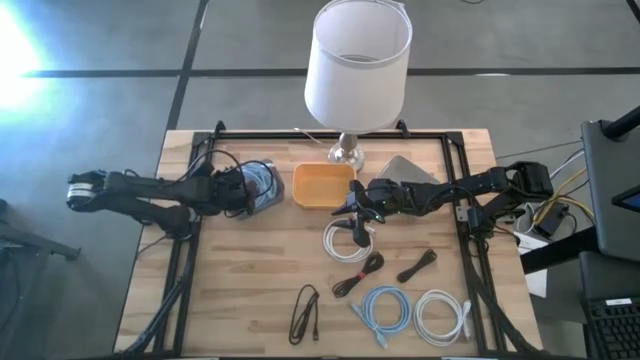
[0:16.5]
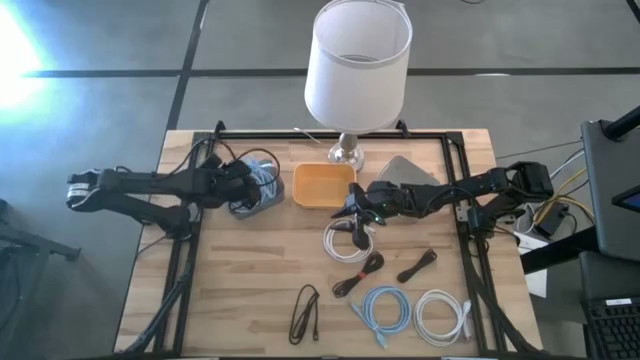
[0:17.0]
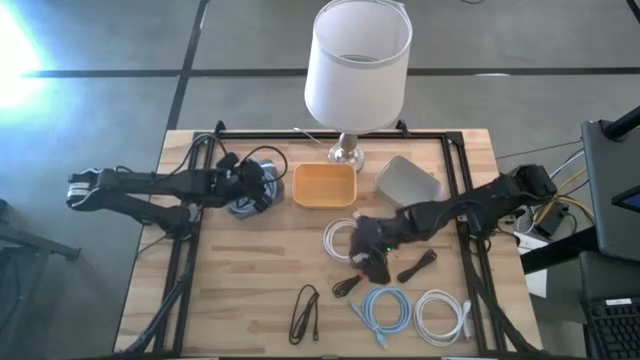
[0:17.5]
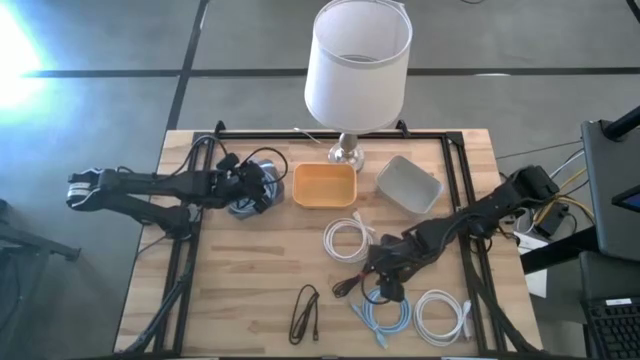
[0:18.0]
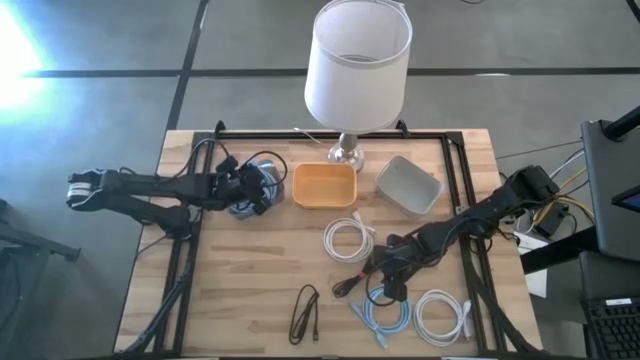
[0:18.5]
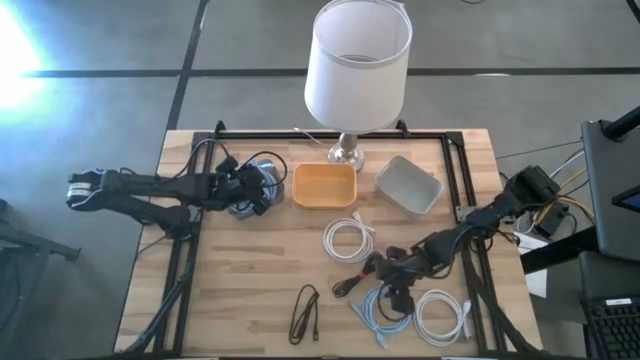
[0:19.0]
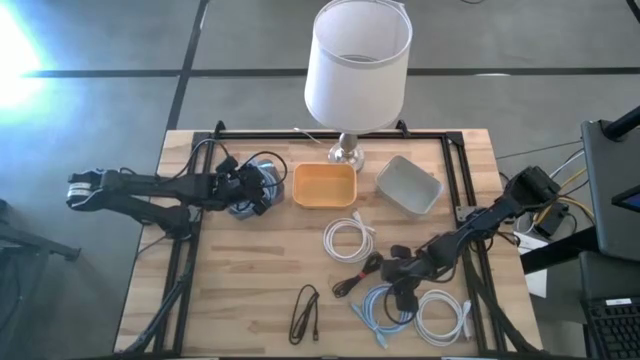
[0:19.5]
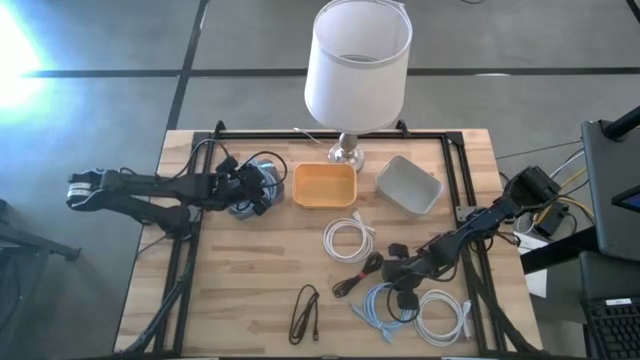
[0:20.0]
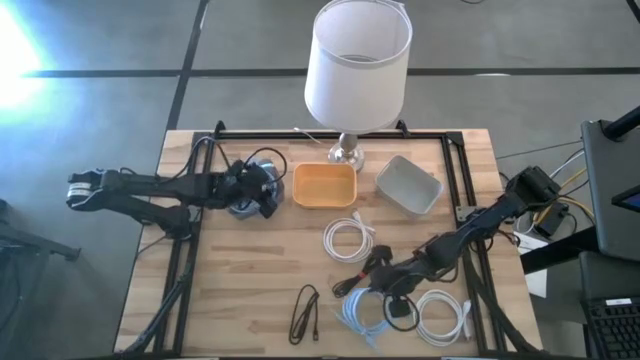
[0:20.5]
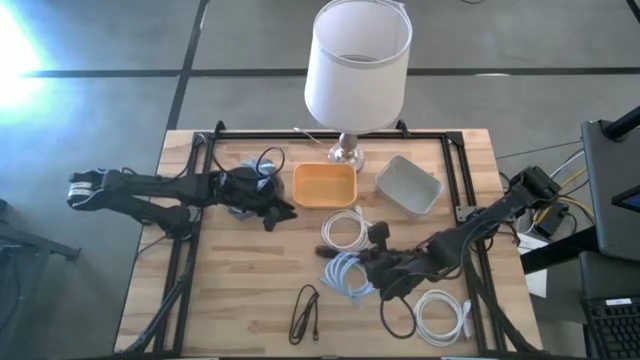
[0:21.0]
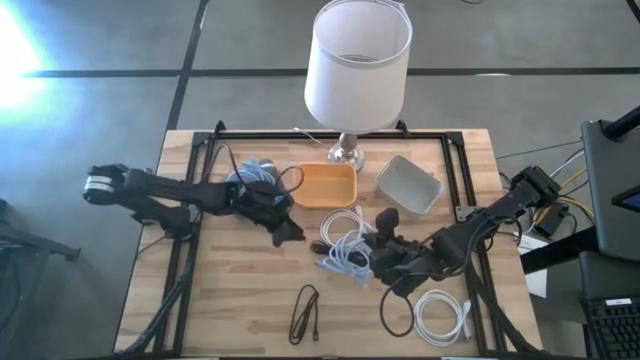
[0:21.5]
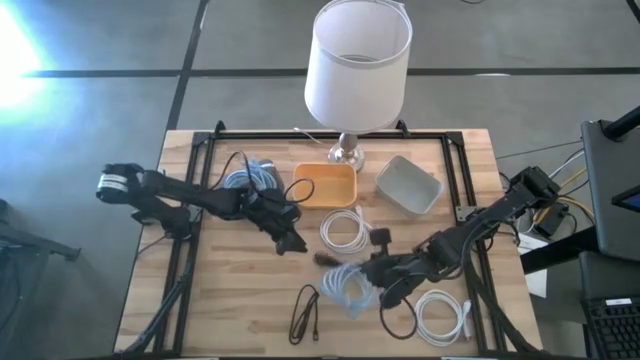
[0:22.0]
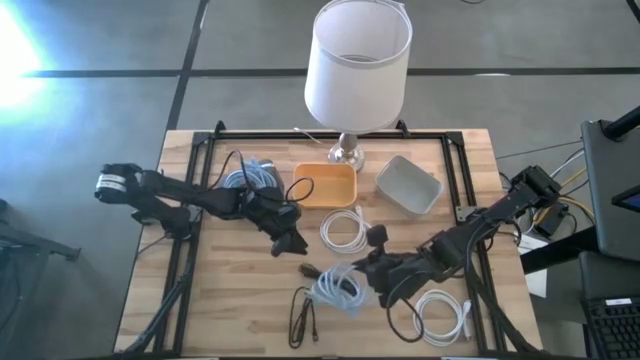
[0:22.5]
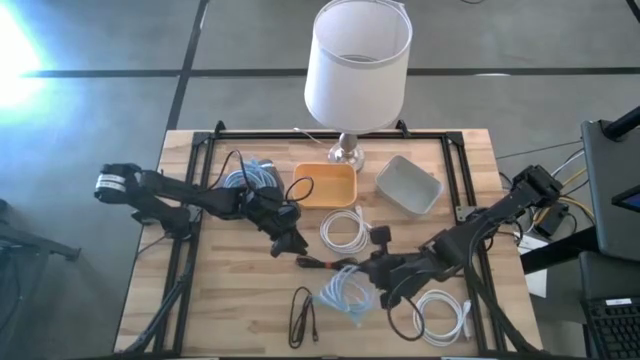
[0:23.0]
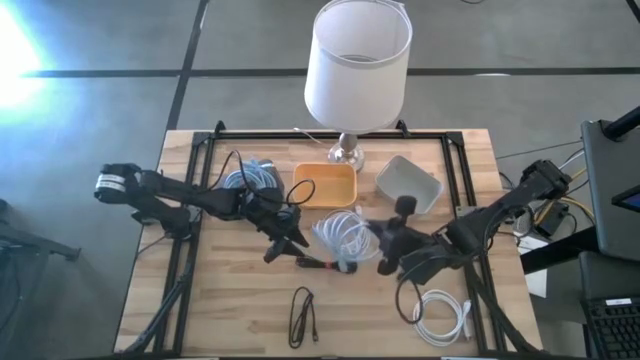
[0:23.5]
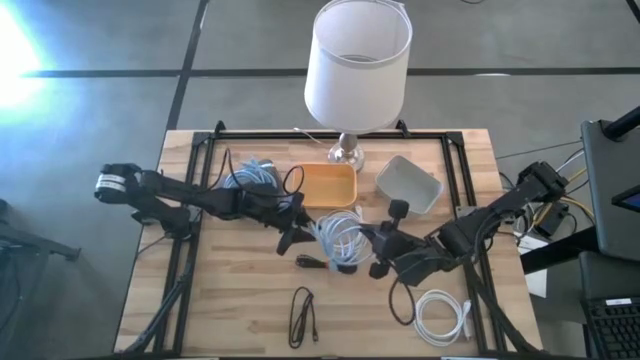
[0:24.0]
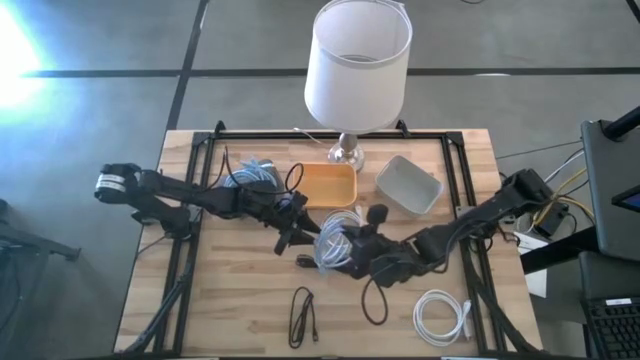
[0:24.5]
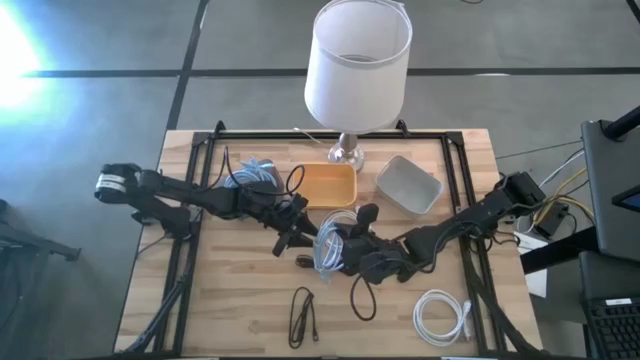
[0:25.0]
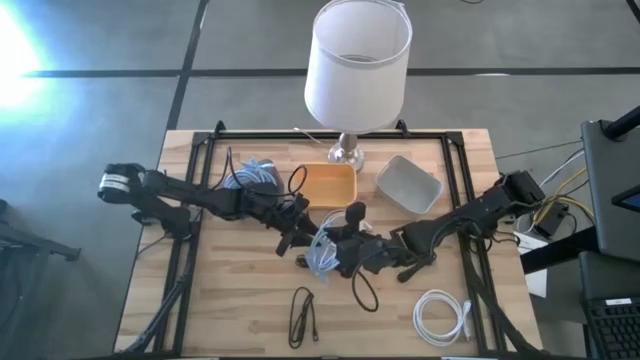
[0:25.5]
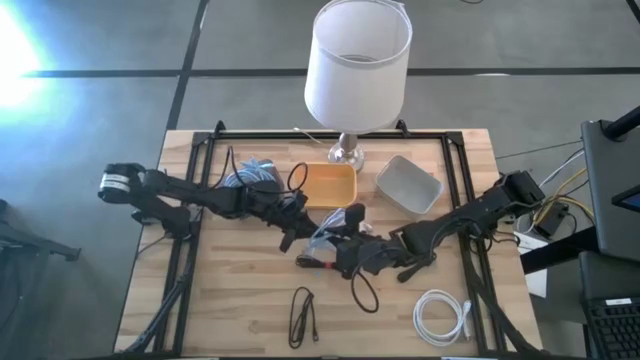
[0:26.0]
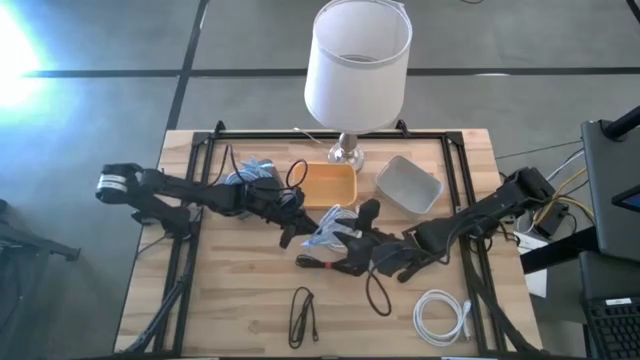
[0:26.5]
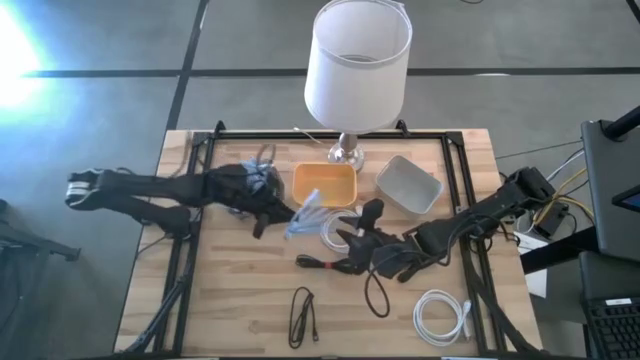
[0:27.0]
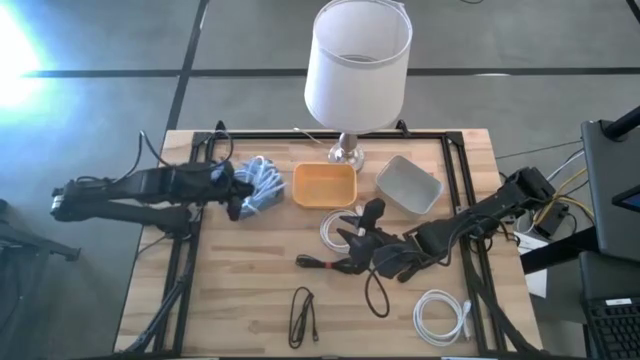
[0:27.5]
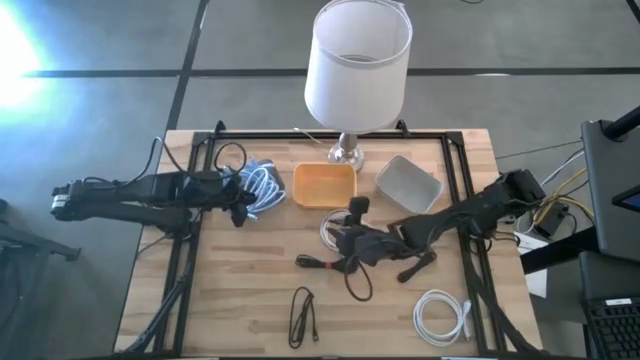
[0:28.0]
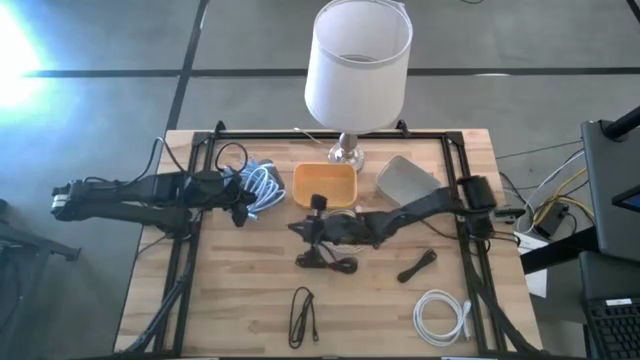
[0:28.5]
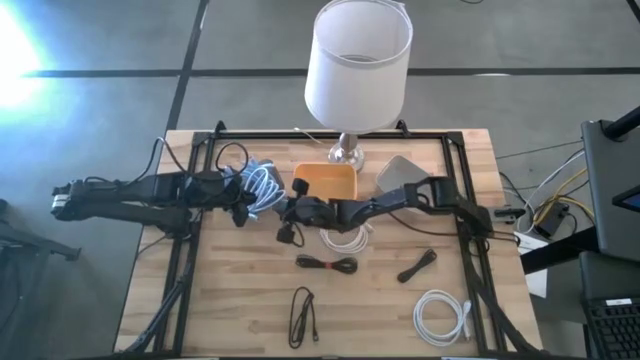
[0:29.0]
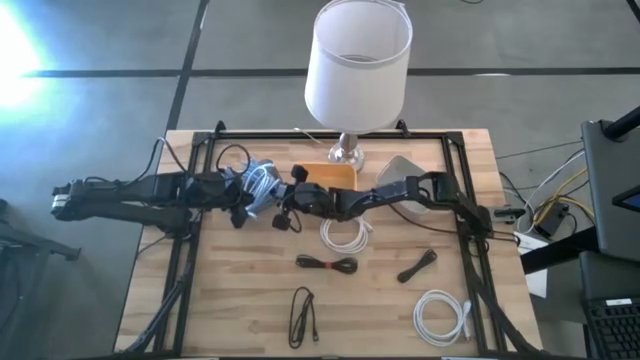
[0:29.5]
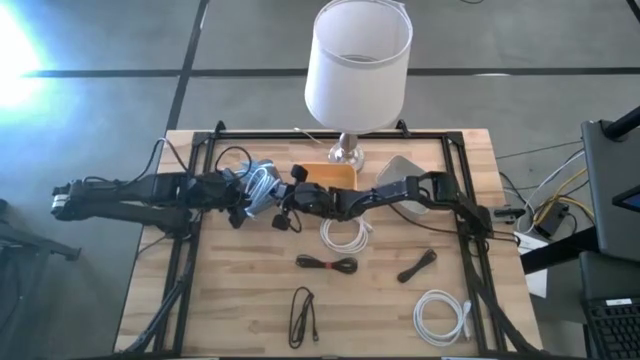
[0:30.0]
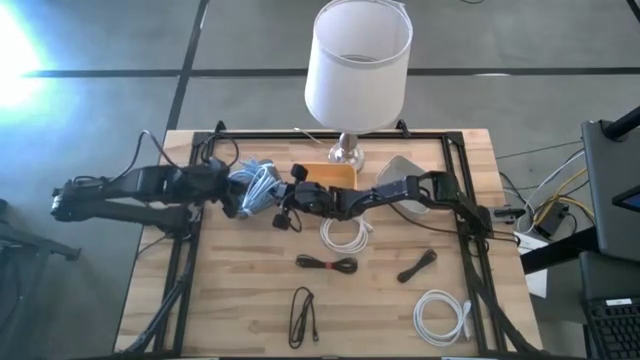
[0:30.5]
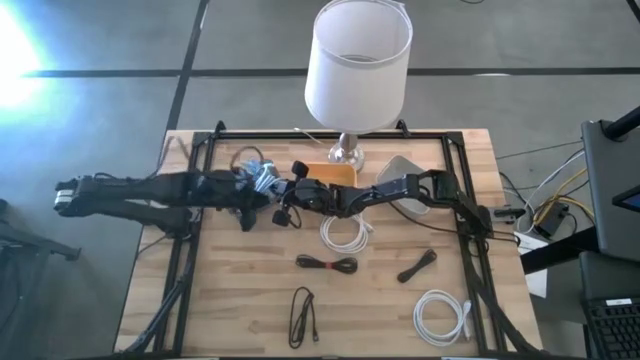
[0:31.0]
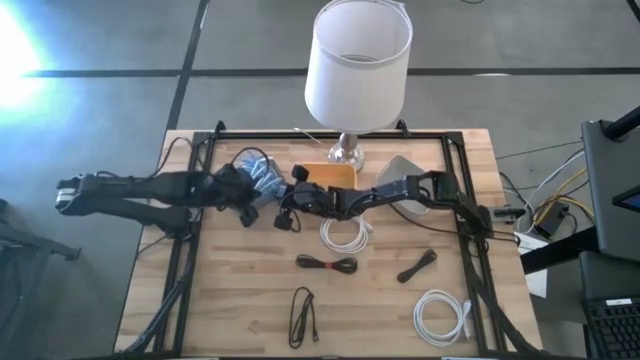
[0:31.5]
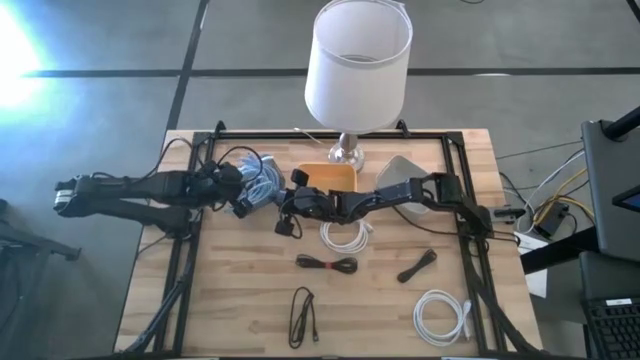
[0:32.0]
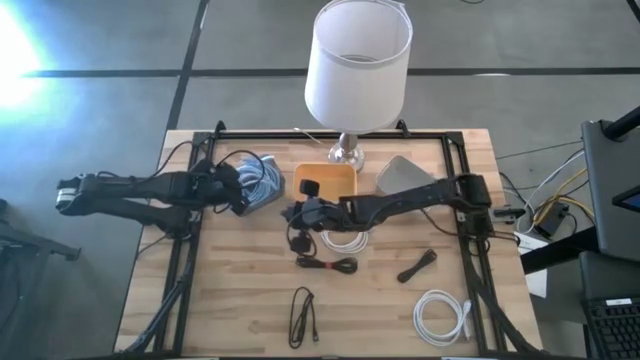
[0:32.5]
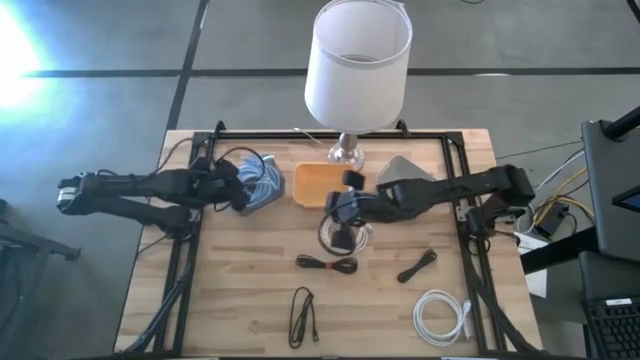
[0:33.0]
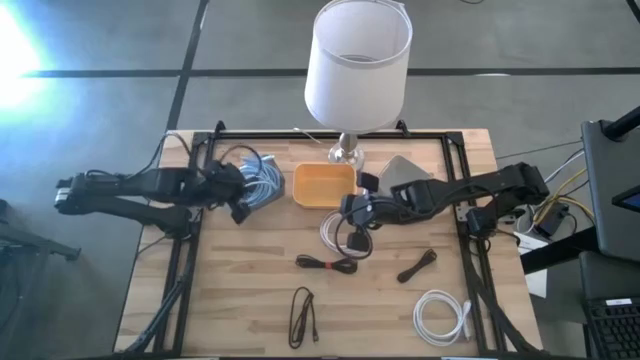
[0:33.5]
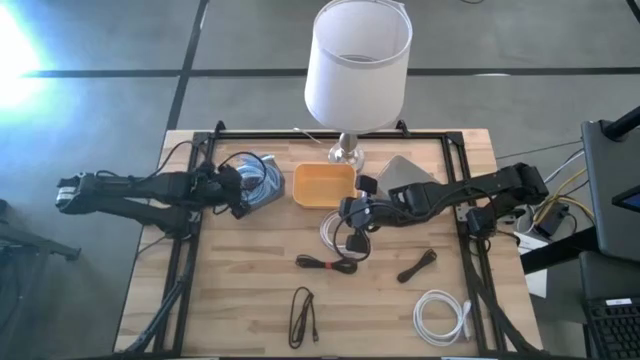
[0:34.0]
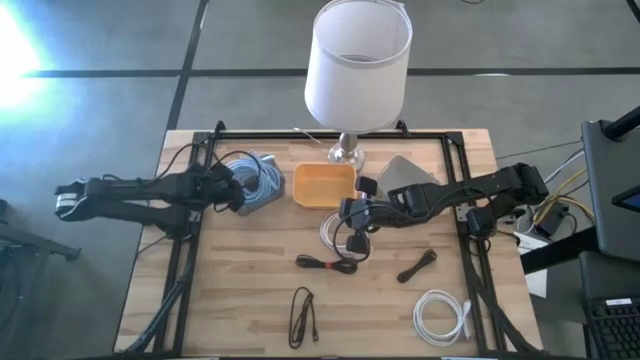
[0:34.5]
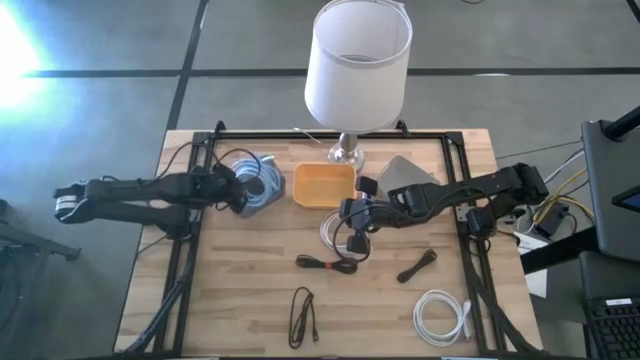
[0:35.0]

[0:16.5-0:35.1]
Task: Sort HDMI cables
Put the blue HDMI cable into the black bin

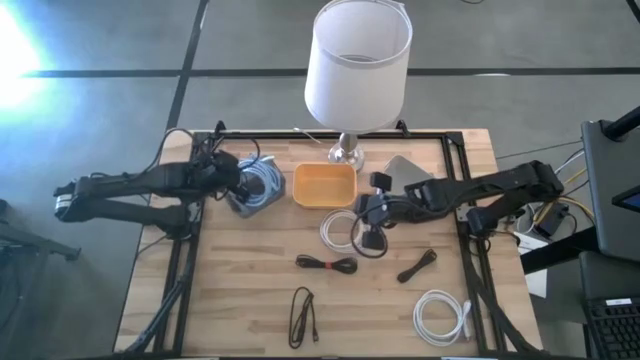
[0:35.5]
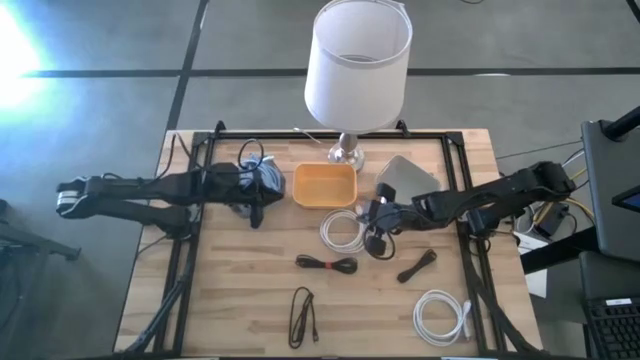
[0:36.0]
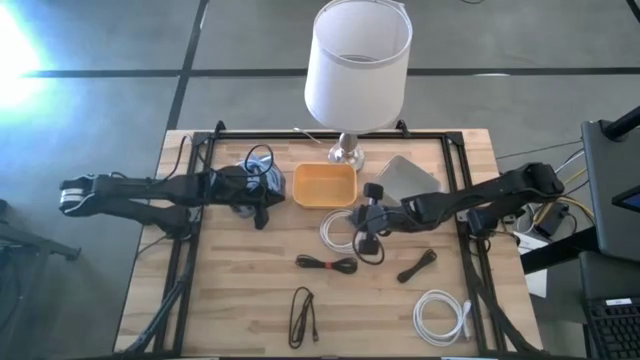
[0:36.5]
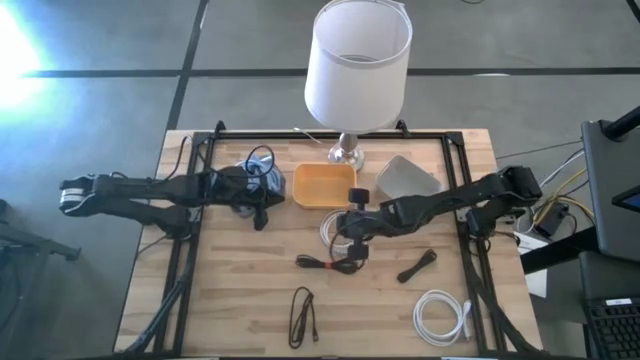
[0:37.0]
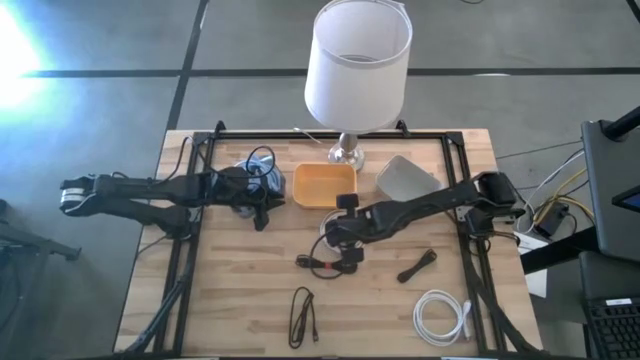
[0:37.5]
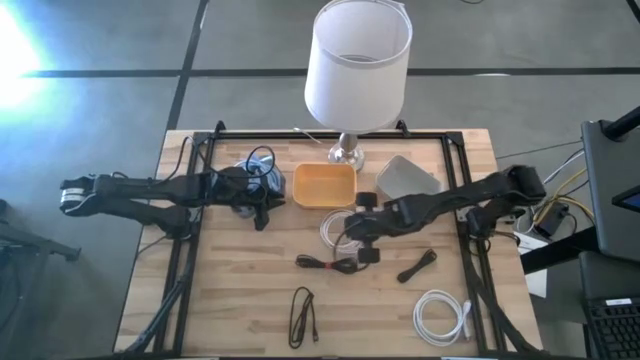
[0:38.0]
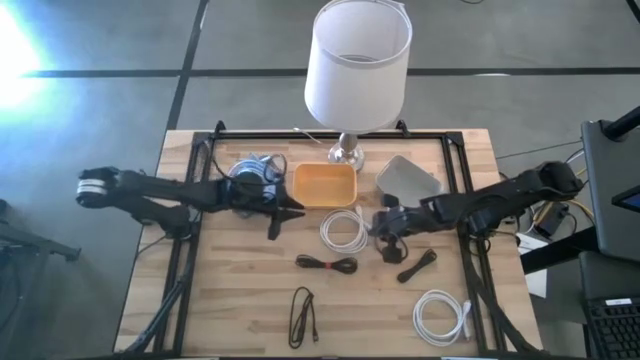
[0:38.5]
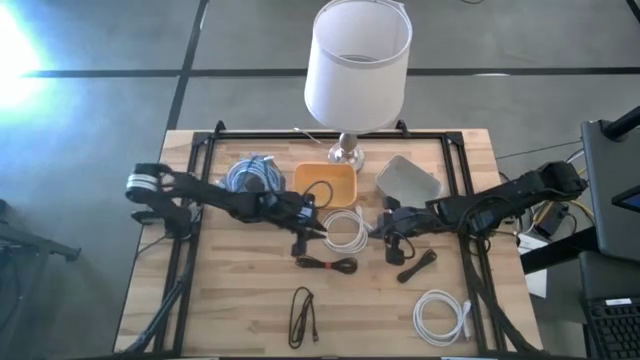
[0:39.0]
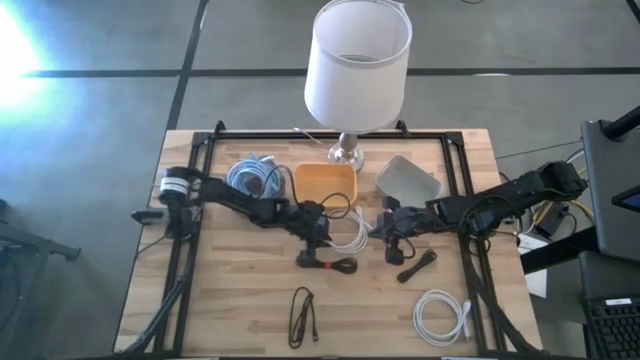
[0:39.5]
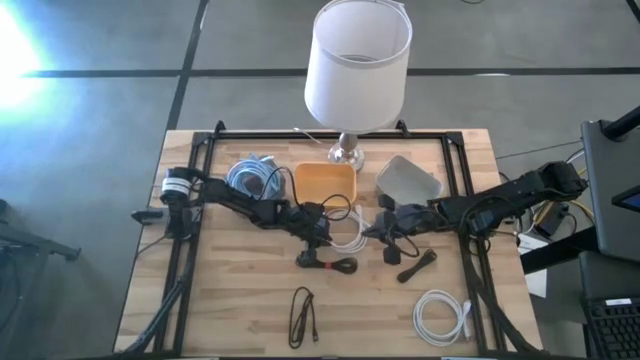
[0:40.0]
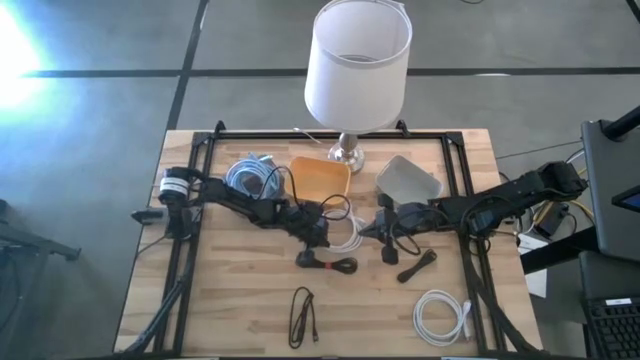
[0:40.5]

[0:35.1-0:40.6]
Put the top white HDMI cable into the yellow bin
